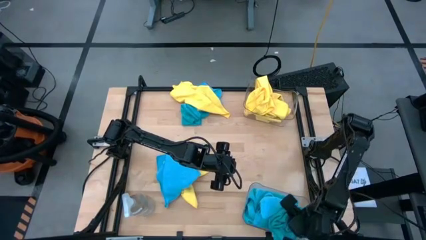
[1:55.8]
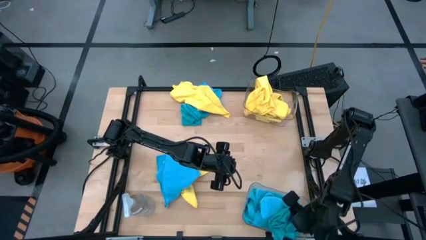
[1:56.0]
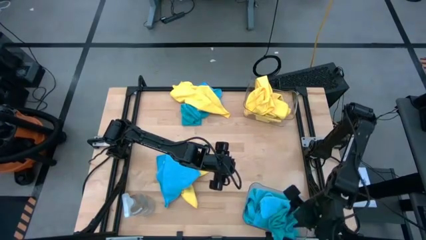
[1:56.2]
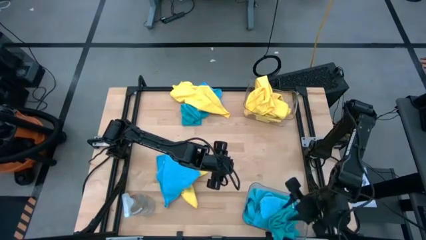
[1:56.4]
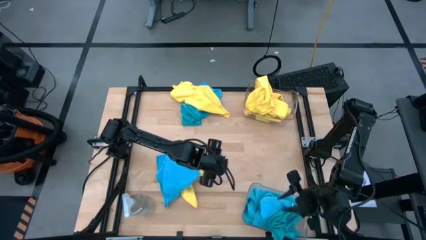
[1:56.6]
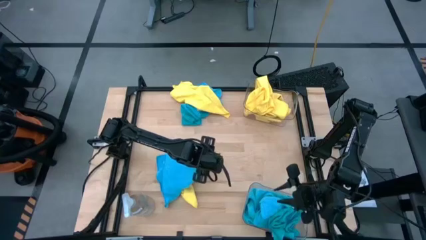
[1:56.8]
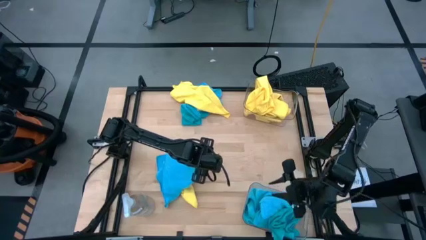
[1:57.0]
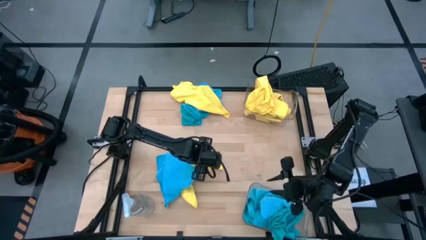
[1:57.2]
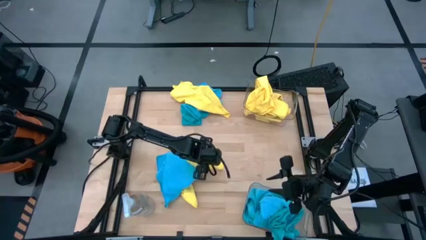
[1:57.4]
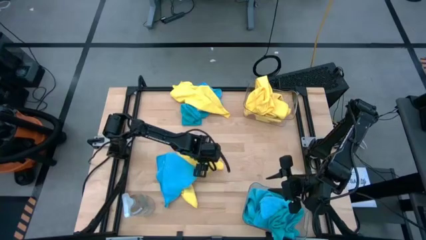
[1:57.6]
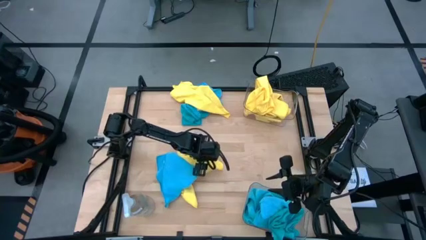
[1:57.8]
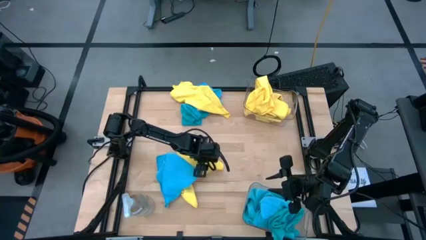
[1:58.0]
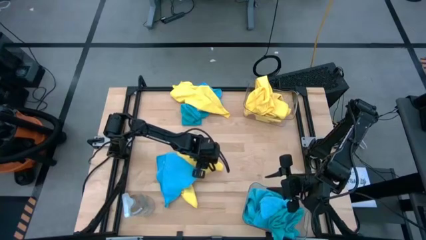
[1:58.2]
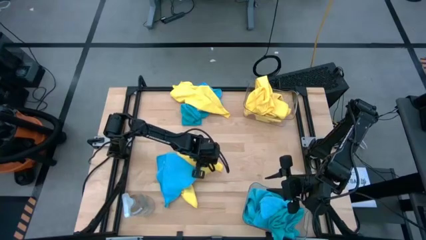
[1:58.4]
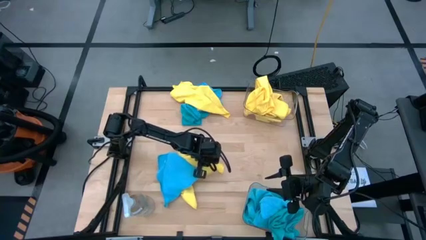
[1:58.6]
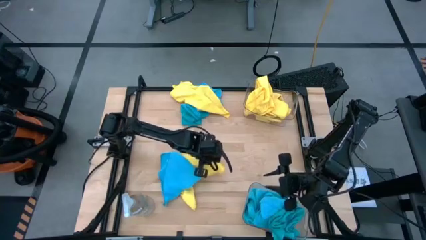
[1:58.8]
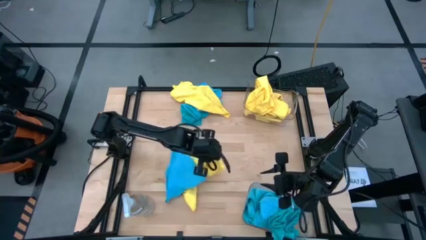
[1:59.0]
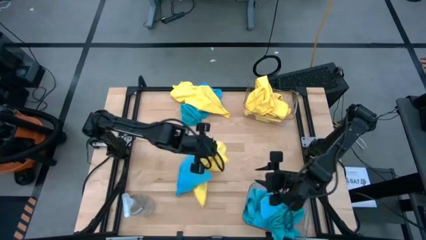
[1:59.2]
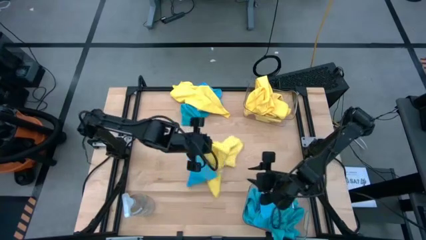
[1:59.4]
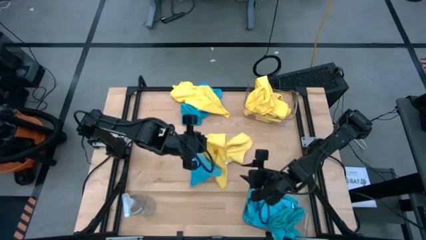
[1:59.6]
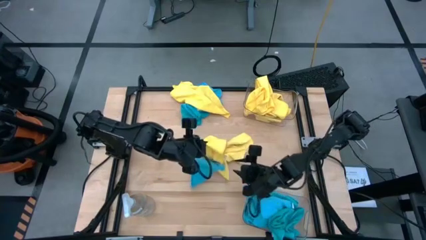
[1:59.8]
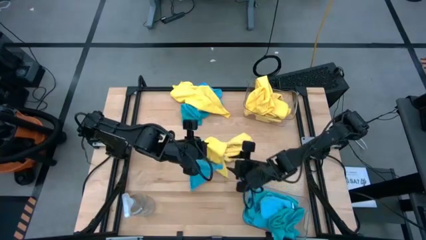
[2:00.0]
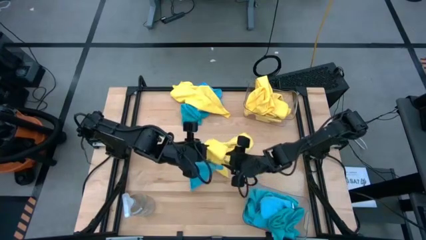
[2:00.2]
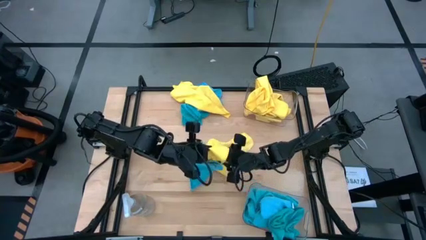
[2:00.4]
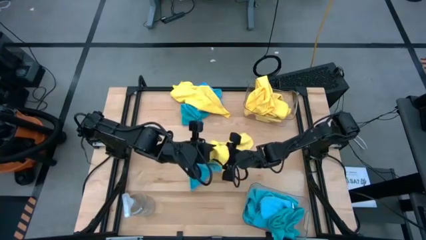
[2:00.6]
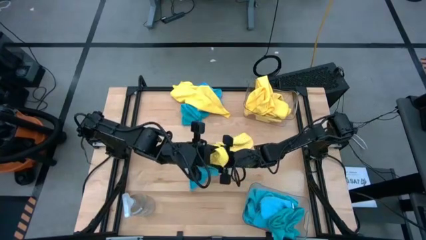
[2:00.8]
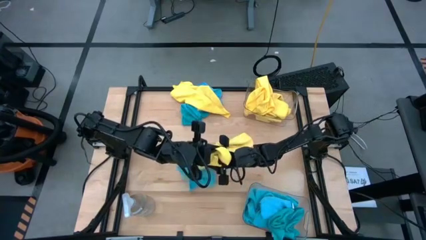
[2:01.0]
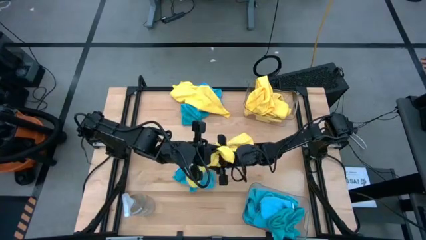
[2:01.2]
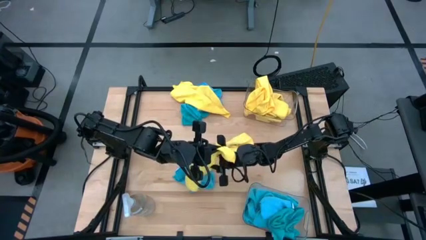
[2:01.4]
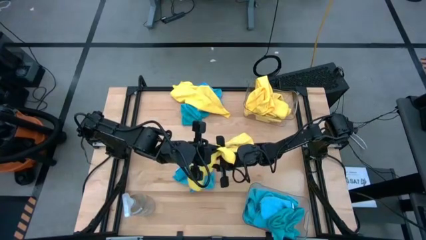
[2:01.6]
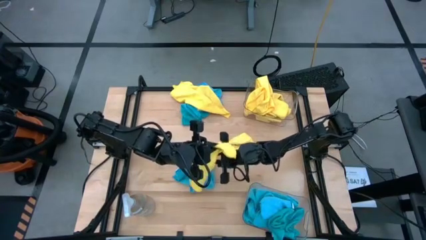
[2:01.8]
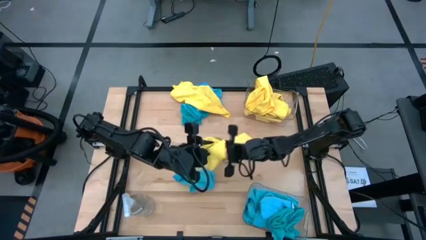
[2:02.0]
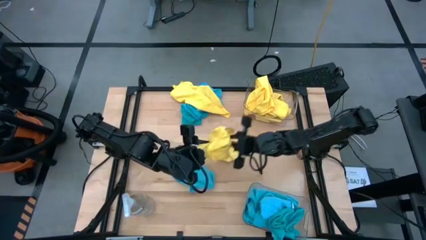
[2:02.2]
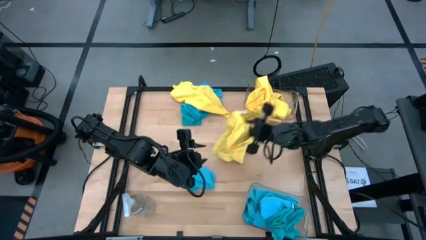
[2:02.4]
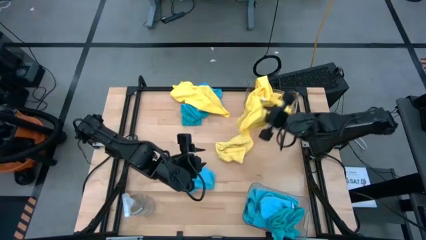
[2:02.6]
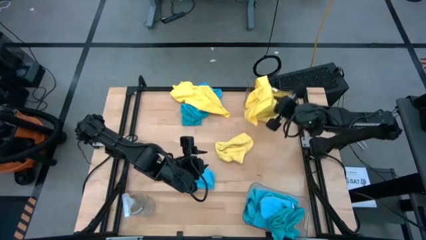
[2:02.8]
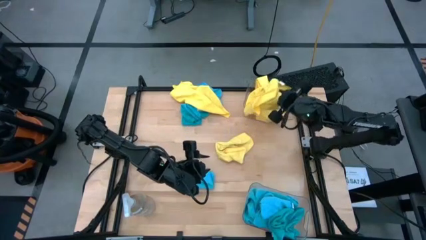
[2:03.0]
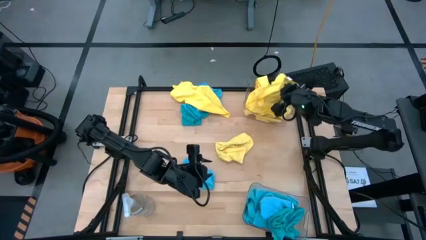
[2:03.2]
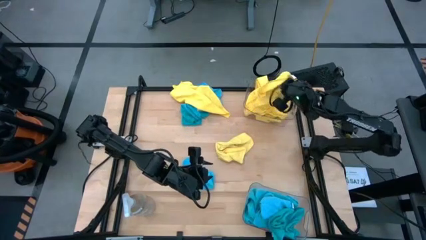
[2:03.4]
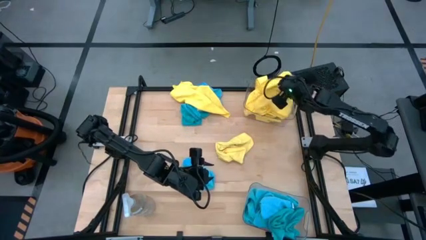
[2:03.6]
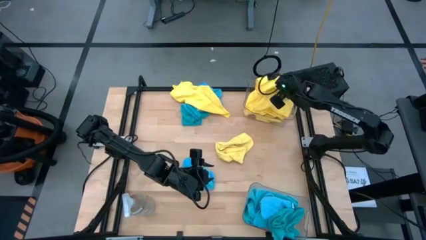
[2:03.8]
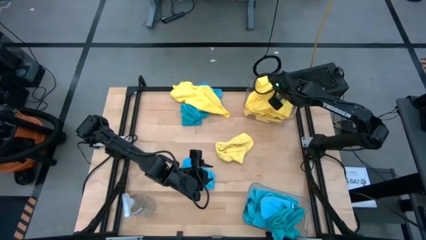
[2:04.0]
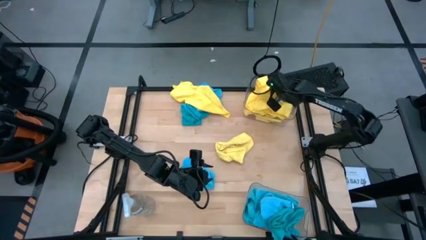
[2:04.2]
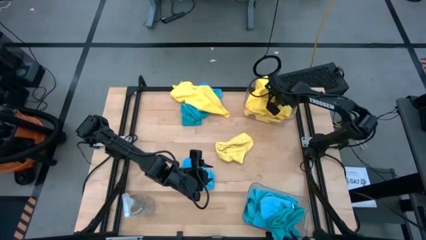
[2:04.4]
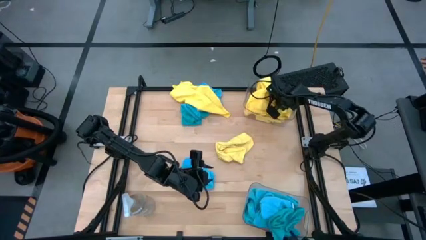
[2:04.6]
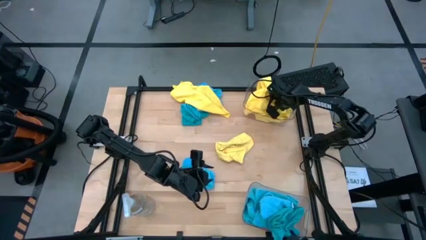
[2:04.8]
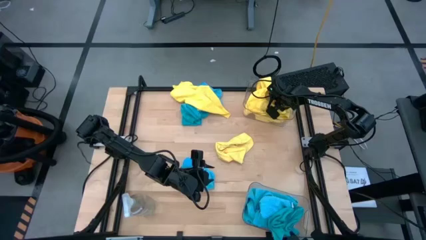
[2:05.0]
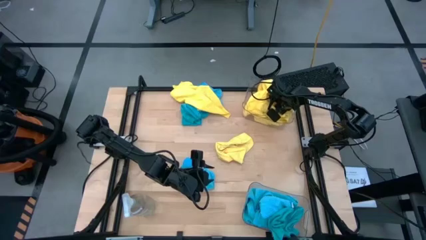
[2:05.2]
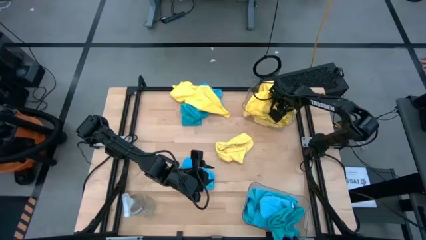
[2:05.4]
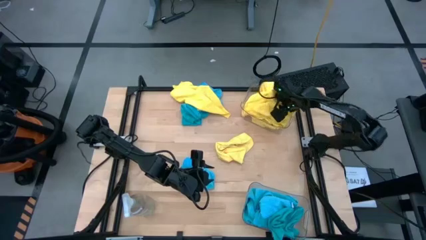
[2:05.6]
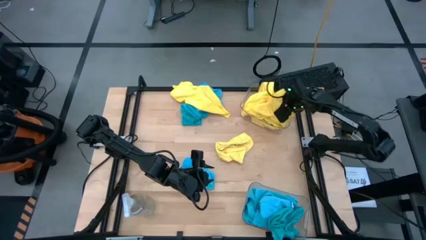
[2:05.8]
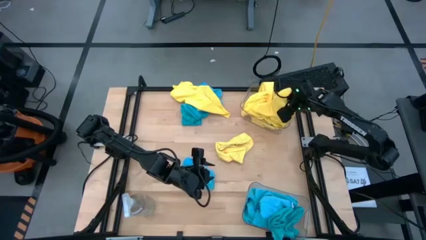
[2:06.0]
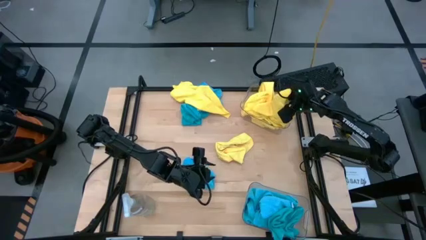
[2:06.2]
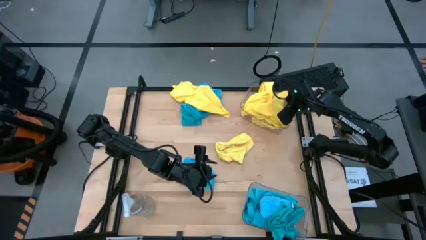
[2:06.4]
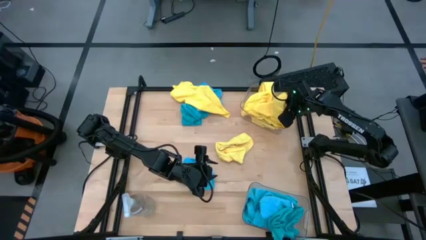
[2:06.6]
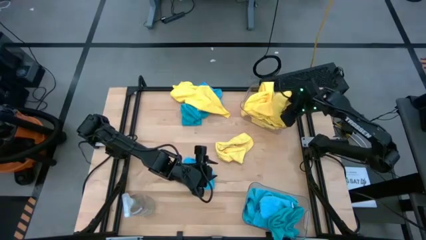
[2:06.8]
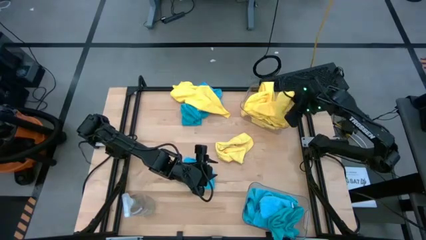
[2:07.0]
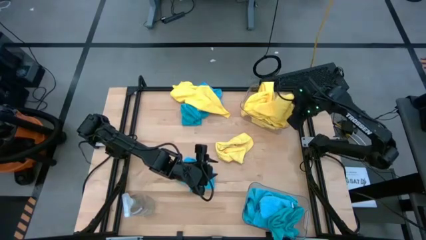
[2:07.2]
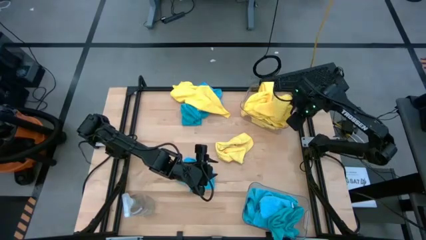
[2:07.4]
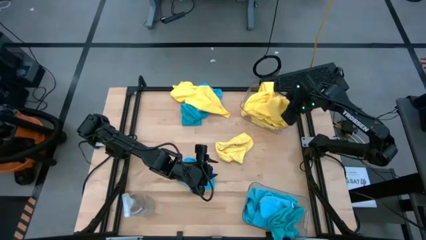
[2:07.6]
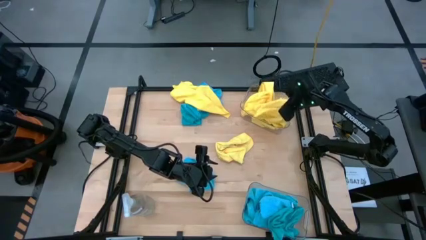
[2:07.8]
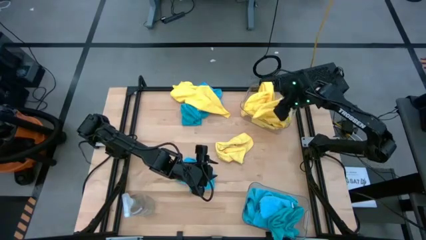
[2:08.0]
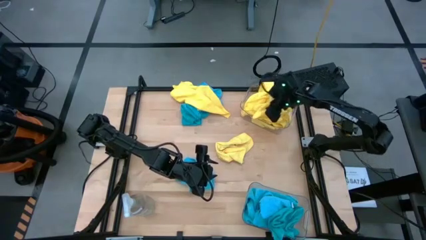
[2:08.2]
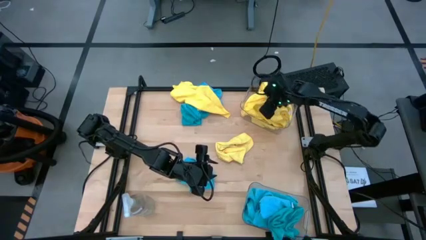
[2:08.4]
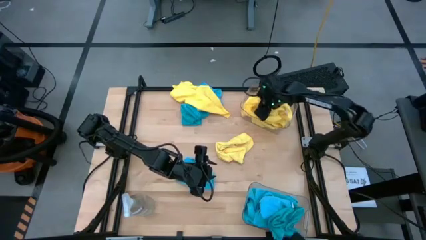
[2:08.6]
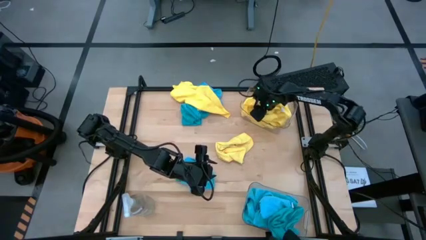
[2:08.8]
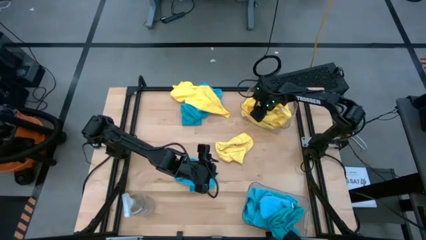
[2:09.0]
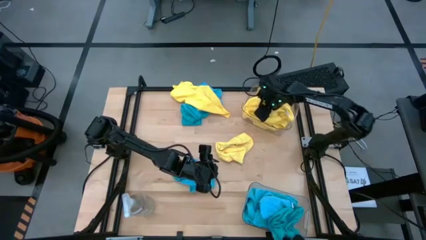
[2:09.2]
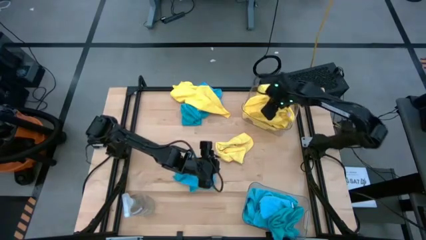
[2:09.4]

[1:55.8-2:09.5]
Task: Sort microfiber towel by color & place in baskets
Put the yellow microfiber cloth into the top transparent bin
